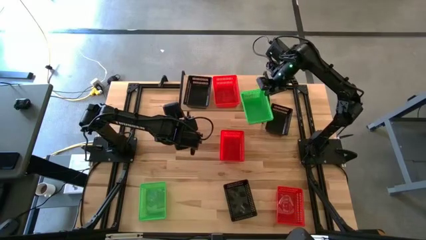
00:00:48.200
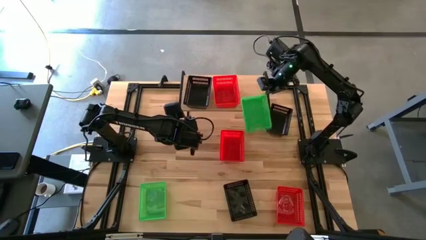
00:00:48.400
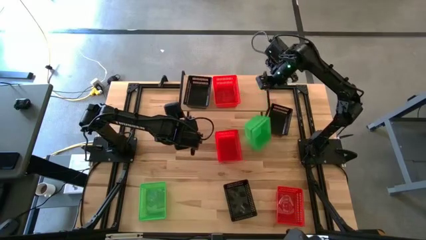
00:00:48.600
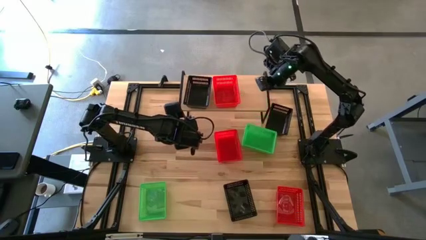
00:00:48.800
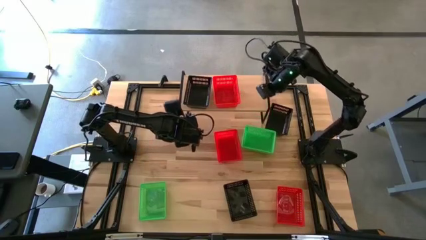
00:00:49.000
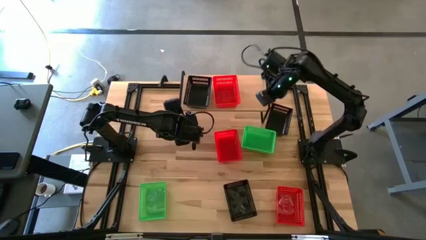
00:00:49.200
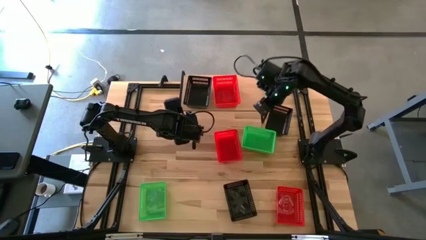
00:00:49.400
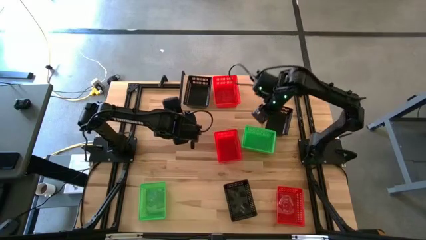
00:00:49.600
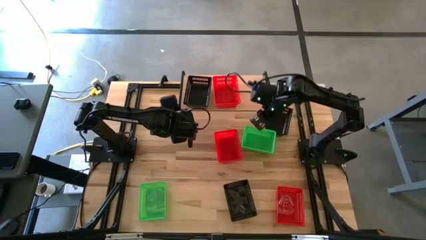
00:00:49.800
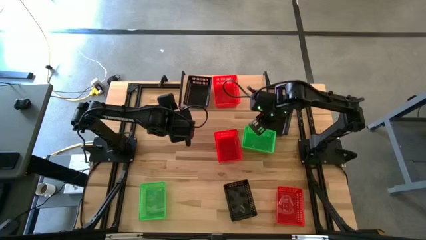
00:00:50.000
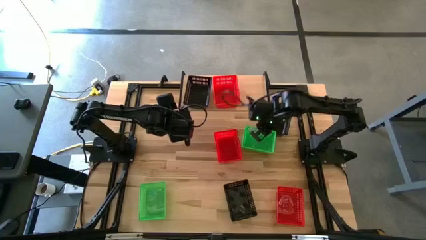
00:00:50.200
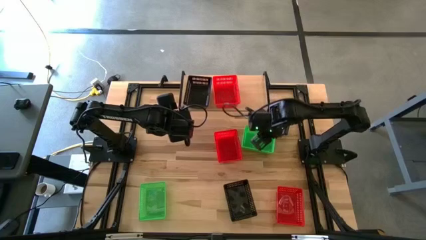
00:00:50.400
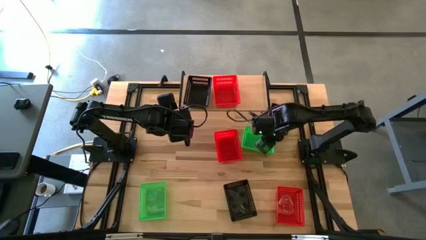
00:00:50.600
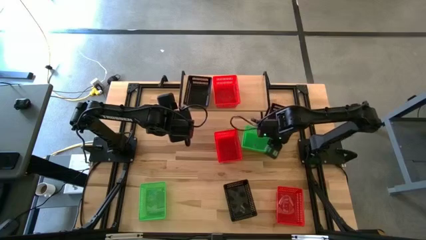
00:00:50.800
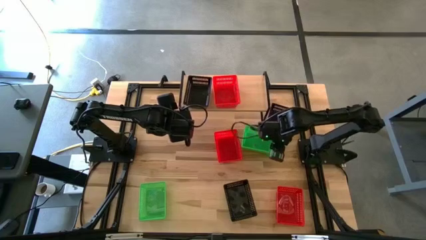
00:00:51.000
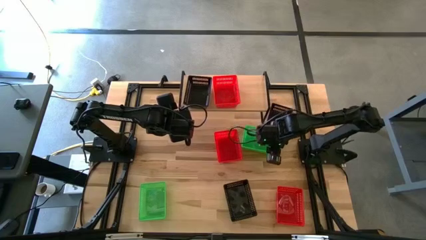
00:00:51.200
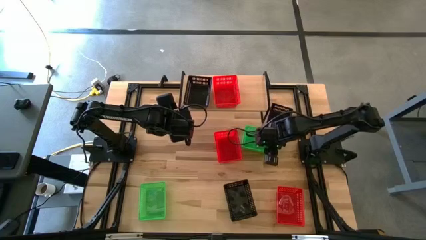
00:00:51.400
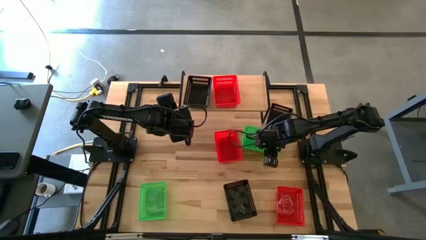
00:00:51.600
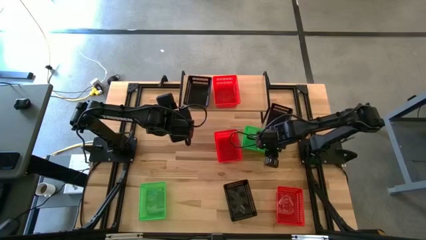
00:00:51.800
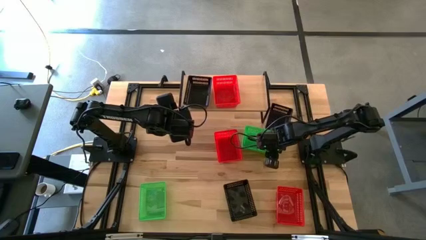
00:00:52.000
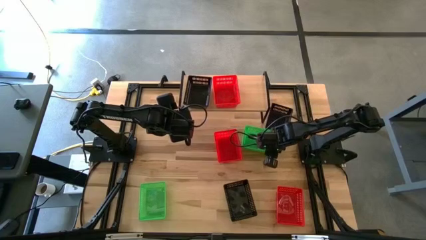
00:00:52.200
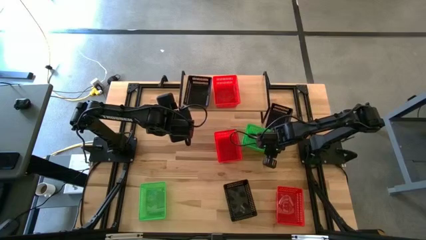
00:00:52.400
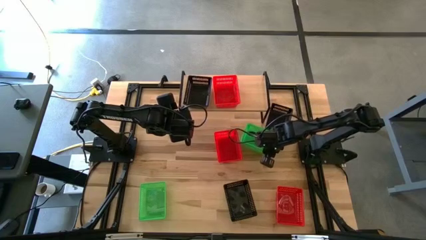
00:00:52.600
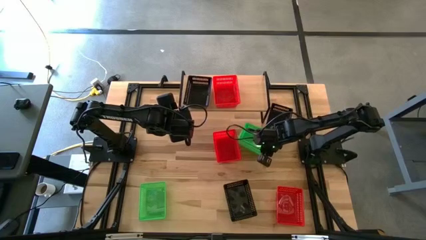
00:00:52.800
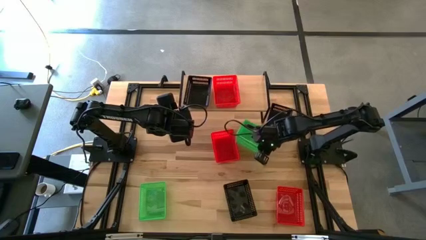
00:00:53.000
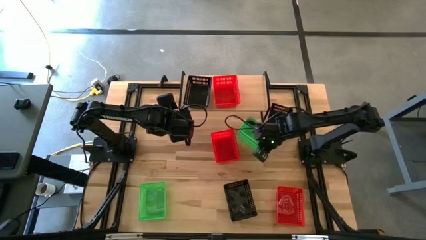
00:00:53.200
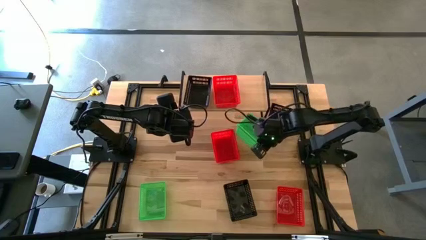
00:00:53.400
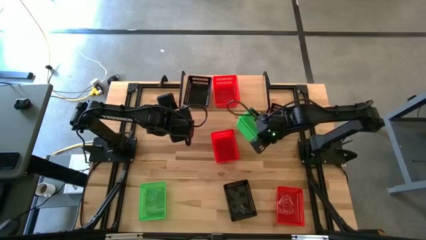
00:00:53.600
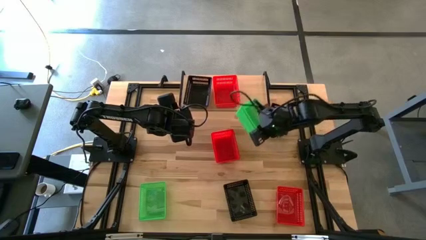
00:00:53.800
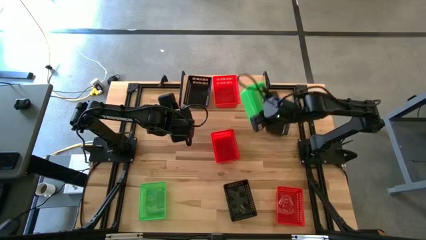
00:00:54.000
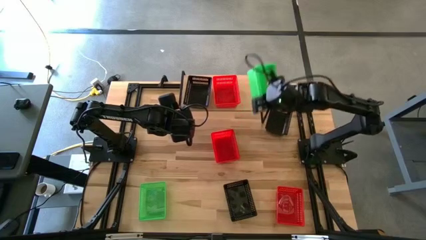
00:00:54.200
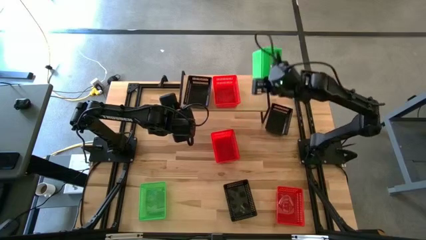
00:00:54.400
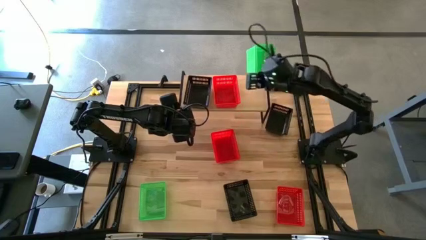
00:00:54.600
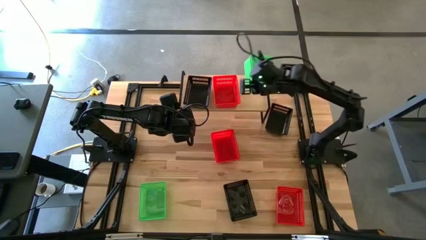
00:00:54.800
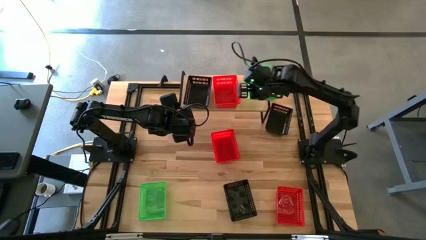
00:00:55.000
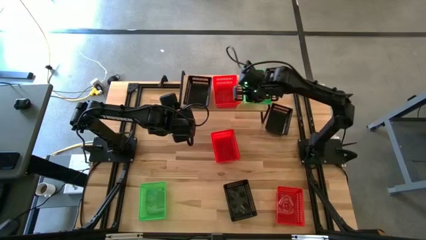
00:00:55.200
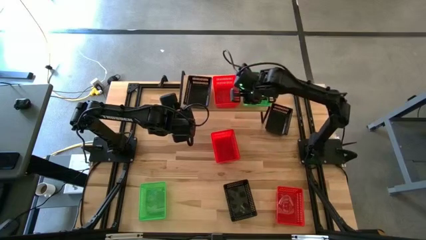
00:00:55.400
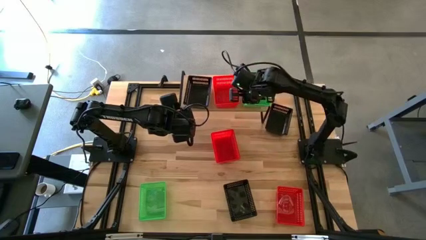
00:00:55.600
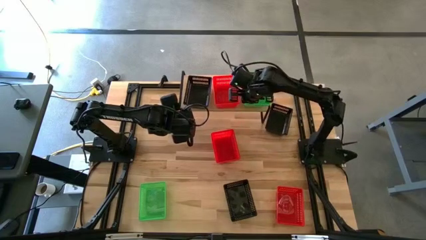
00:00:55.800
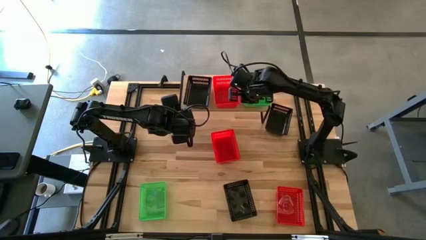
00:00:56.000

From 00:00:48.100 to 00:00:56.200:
Task: Stack baskets on shelf by color
Put the stacked green bins on the shelf

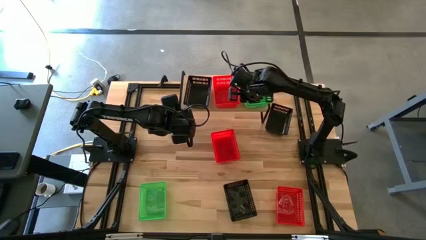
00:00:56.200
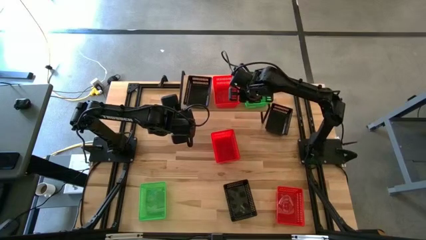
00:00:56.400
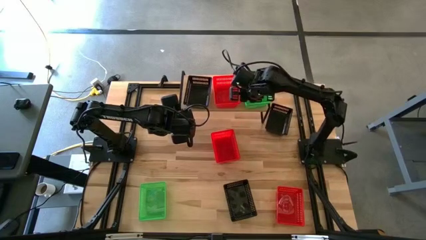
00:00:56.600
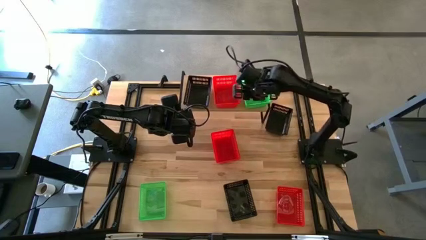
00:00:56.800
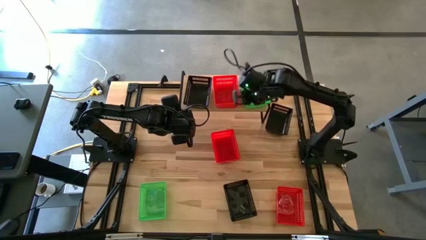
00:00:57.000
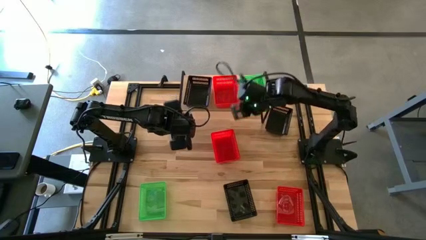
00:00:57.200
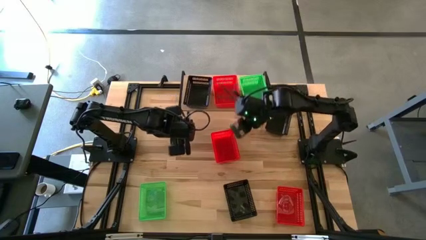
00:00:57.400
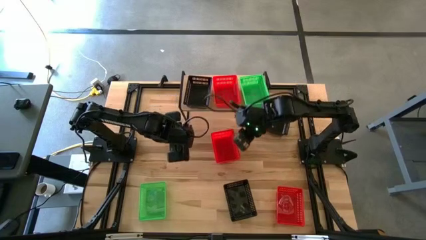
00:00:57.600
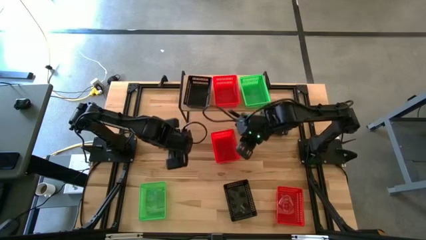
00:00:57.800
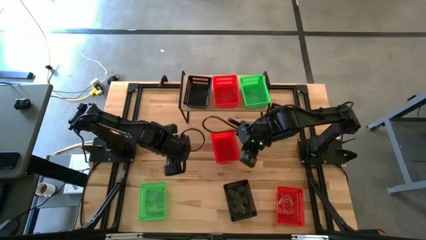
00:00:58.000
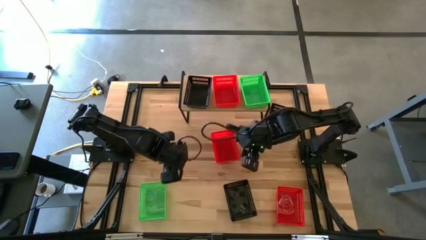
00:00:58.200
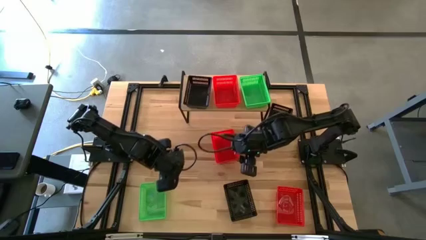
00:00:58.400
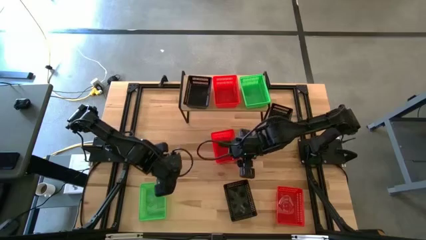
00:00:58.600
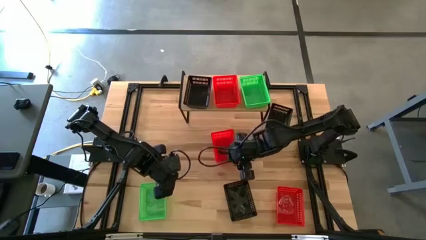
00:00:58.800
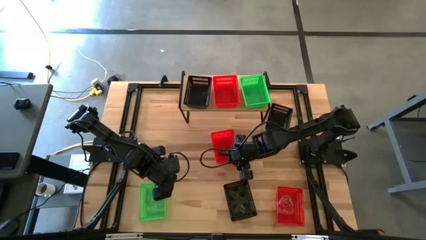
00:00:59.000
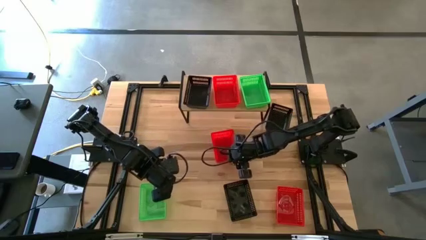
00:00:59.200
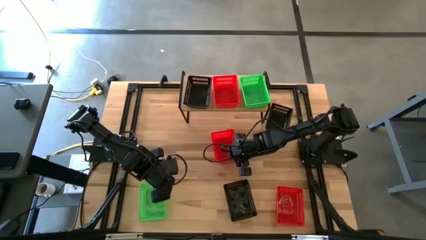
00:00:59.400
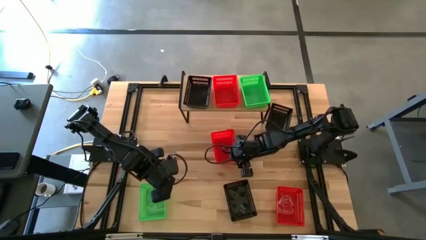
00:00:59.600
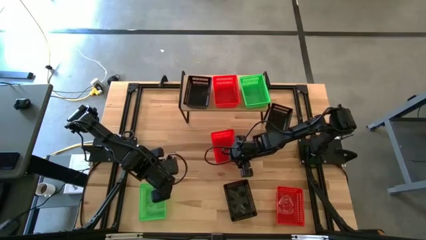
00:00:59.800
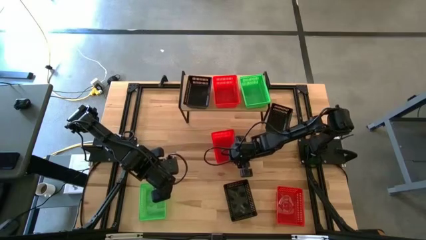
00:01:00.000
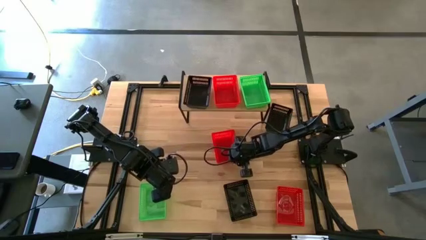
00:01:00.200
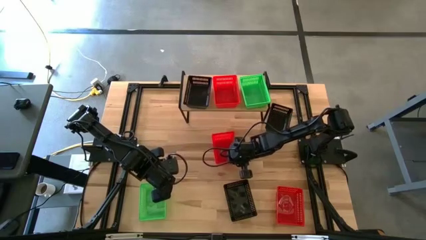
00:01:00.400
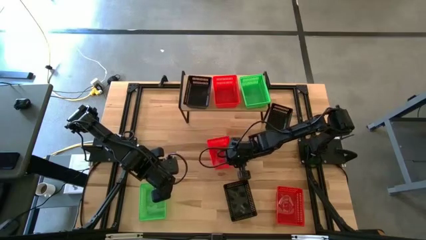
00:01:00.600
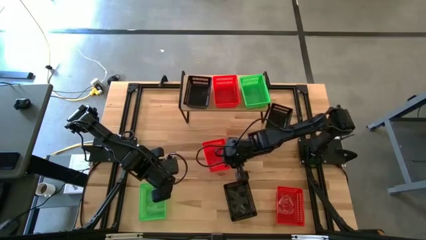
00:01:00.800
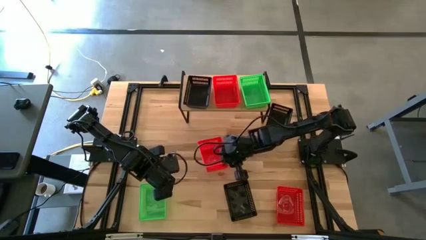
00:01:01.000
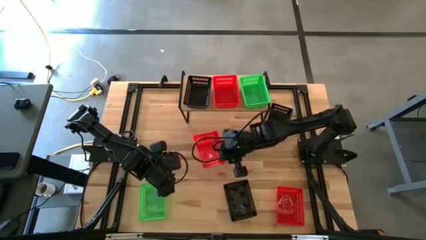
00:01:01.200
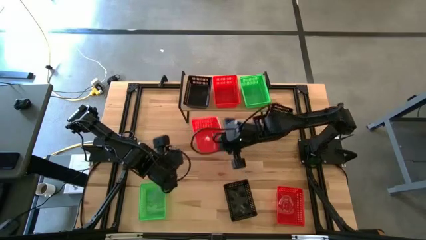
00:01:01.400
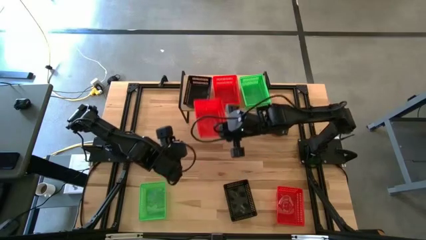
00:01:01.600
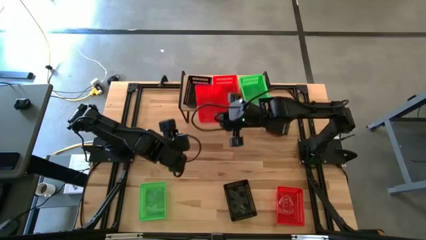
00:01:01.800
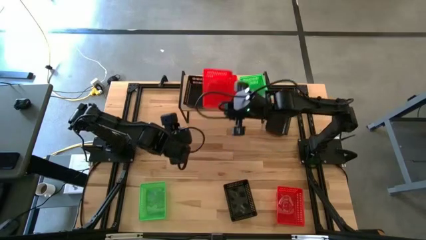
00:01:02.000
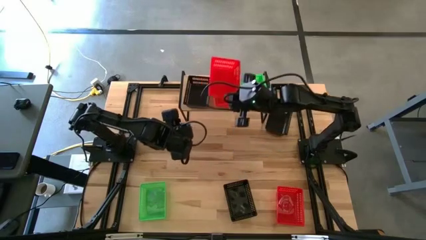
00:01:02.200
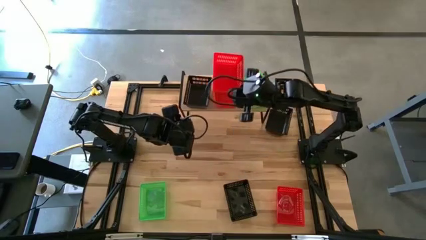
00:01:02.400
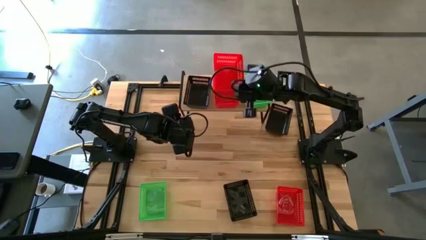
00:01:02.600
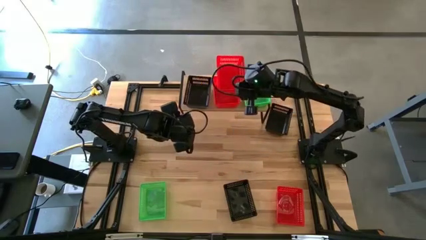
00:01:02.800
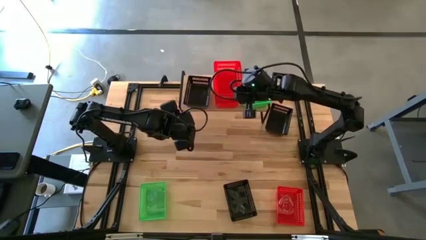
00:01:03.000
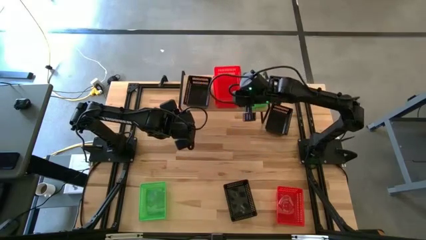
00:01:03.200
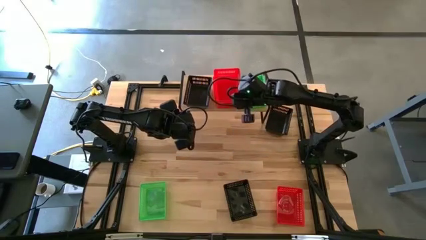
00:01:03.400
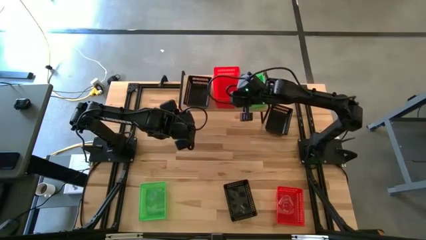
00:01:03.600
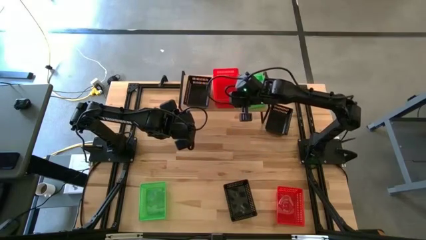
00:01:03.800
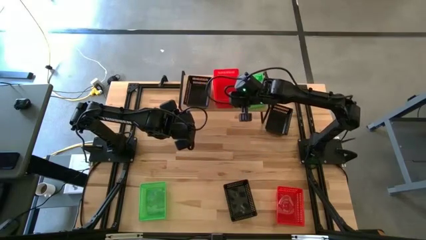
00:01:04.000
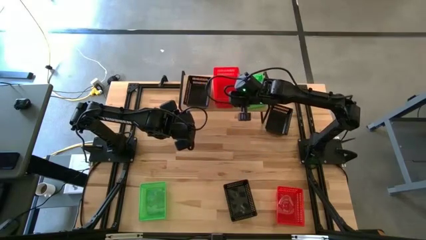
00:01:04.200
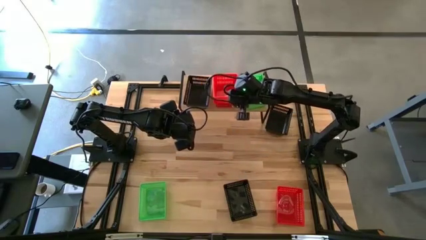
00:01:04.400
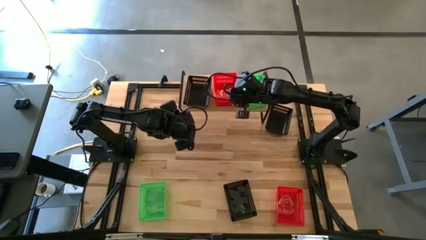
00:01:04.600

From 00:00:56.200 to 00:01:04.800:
Stack the top red bin on the red bin on the shelf
